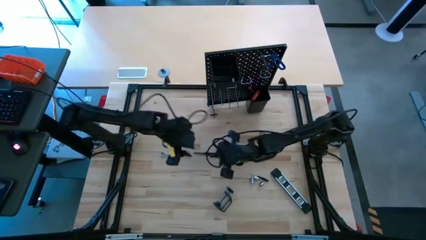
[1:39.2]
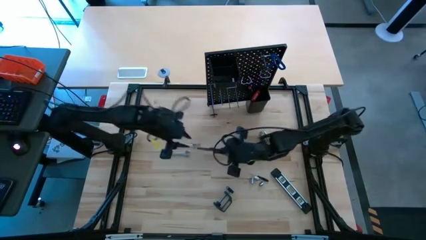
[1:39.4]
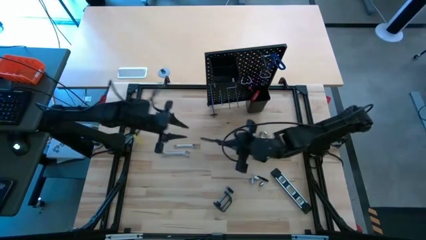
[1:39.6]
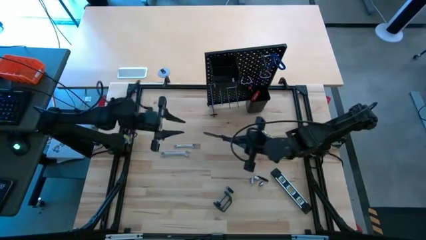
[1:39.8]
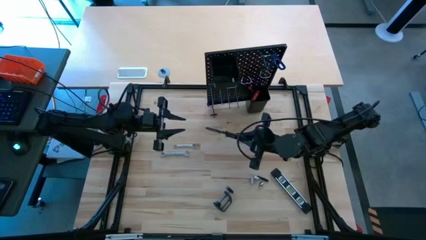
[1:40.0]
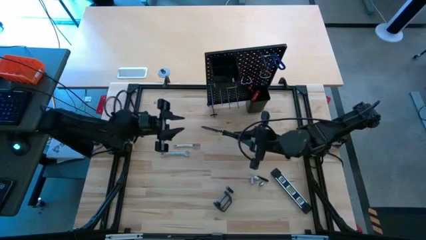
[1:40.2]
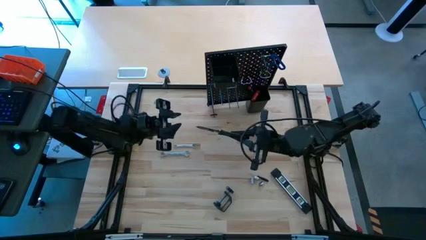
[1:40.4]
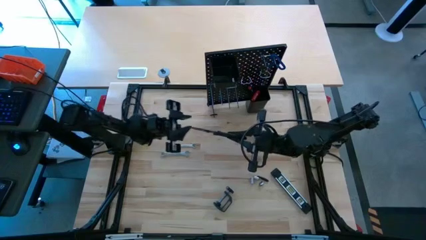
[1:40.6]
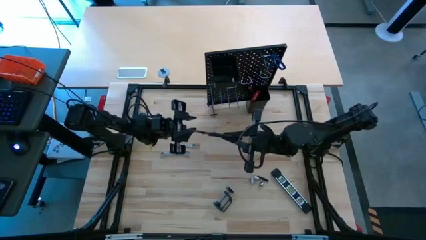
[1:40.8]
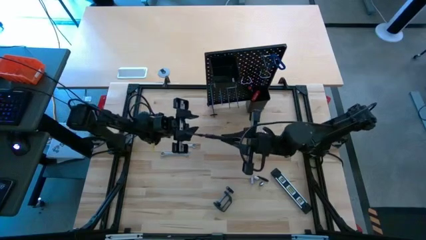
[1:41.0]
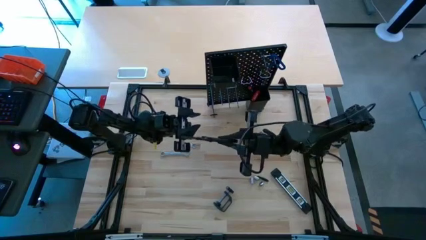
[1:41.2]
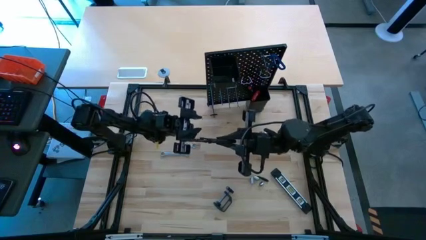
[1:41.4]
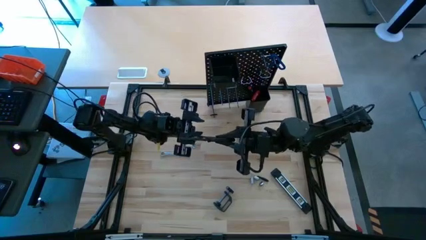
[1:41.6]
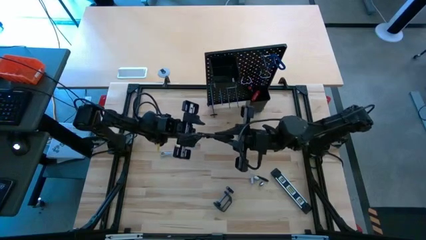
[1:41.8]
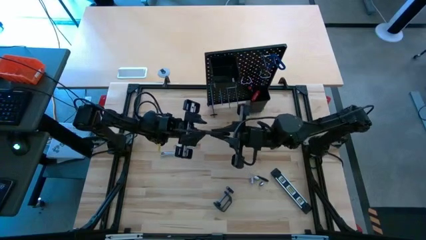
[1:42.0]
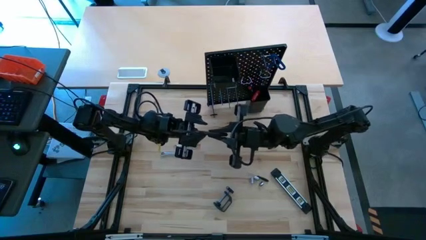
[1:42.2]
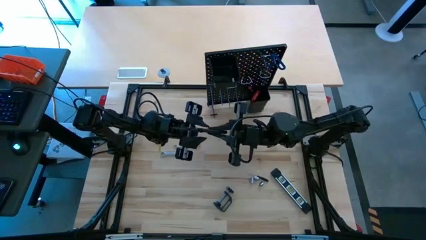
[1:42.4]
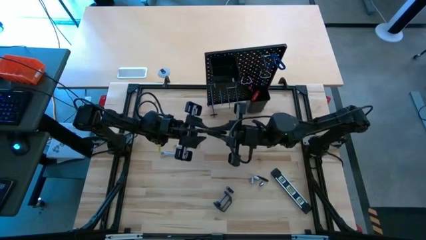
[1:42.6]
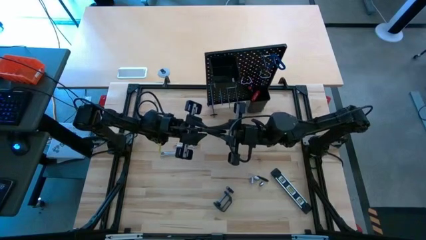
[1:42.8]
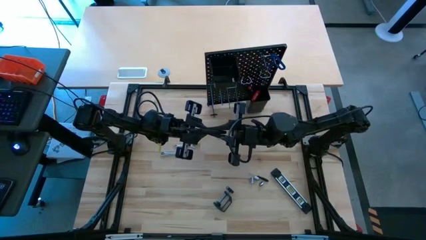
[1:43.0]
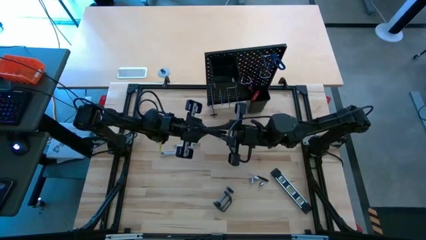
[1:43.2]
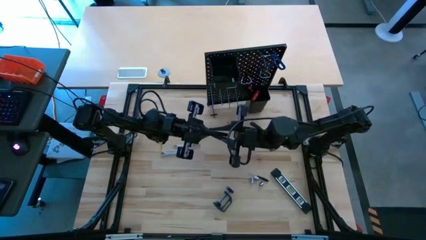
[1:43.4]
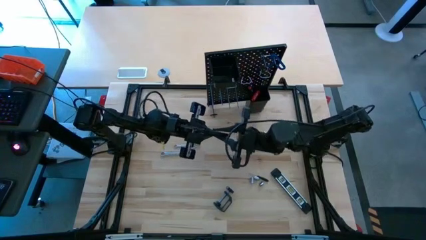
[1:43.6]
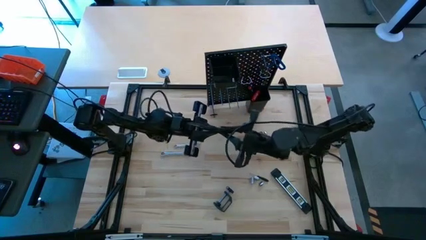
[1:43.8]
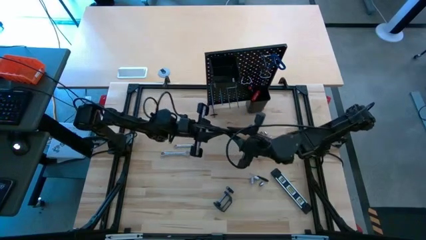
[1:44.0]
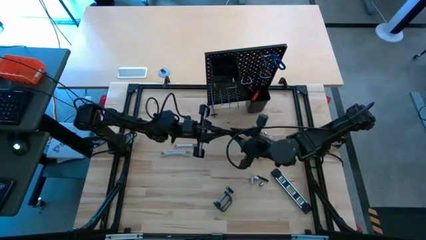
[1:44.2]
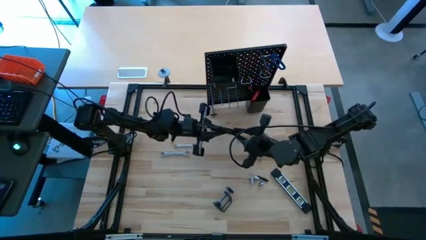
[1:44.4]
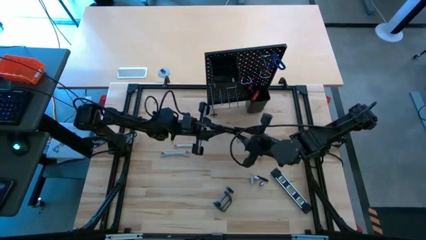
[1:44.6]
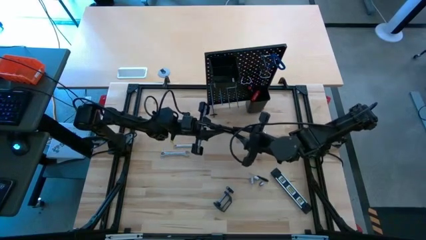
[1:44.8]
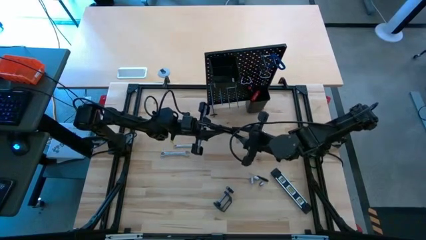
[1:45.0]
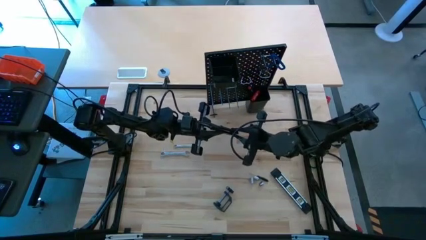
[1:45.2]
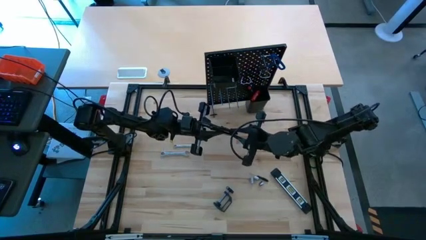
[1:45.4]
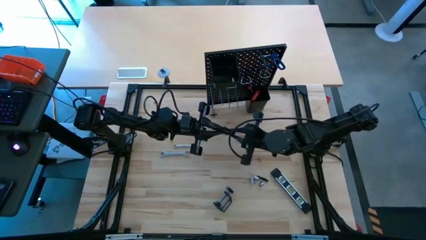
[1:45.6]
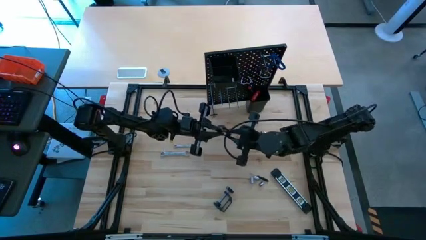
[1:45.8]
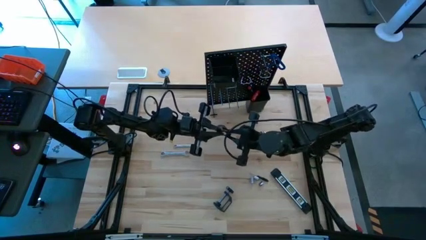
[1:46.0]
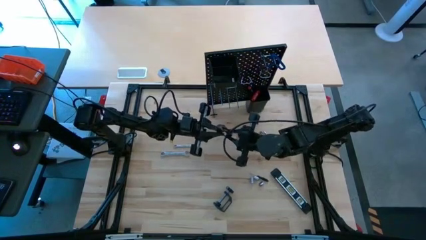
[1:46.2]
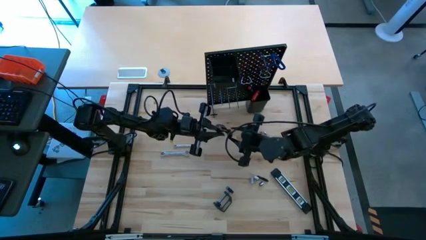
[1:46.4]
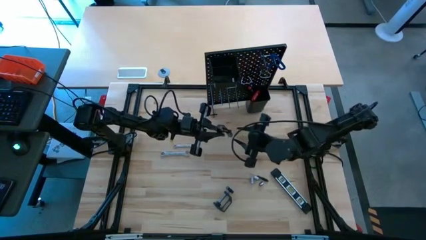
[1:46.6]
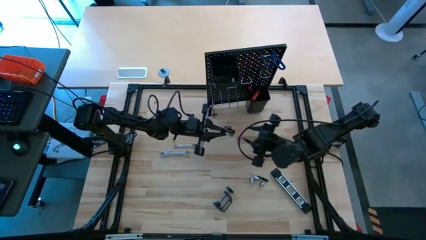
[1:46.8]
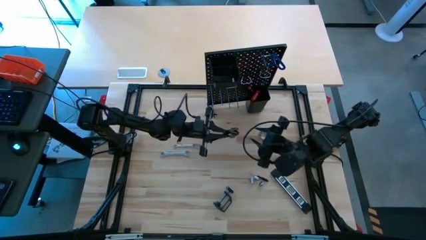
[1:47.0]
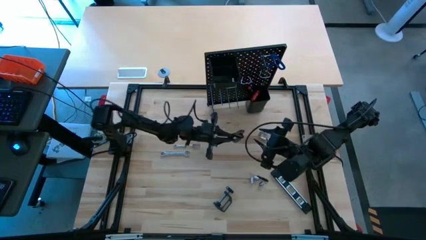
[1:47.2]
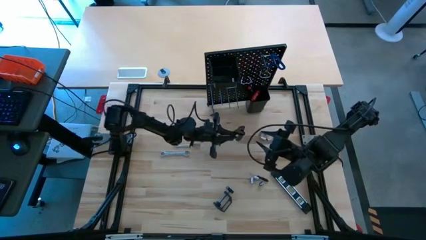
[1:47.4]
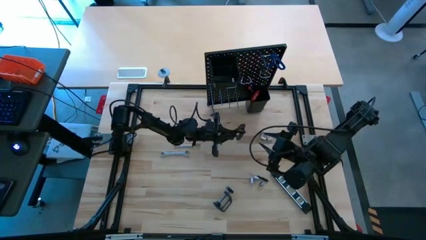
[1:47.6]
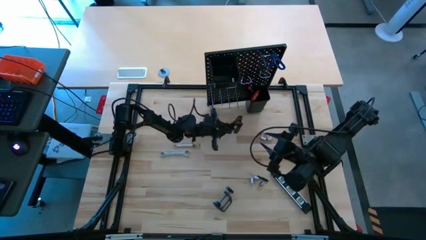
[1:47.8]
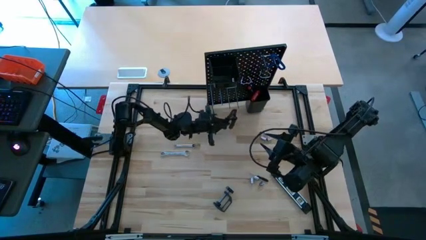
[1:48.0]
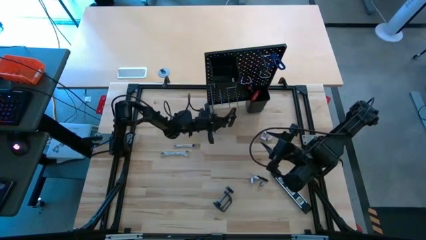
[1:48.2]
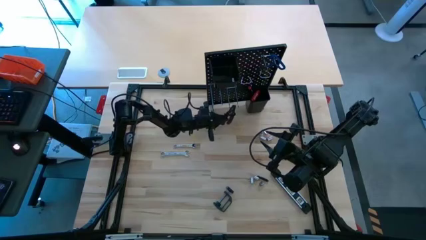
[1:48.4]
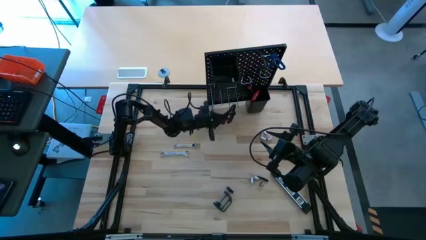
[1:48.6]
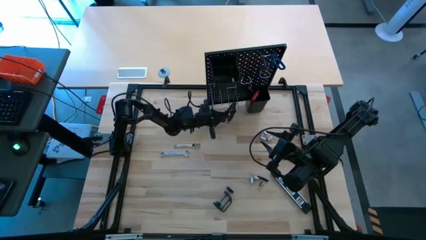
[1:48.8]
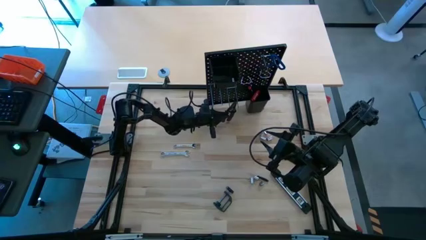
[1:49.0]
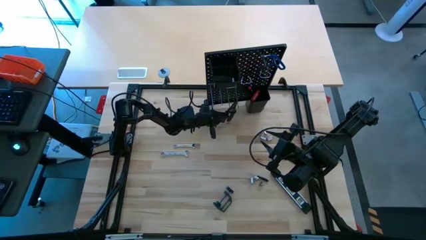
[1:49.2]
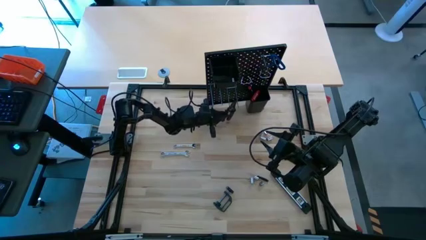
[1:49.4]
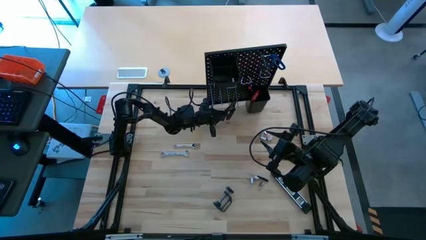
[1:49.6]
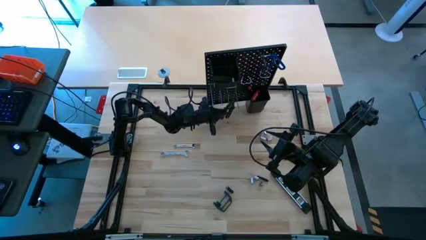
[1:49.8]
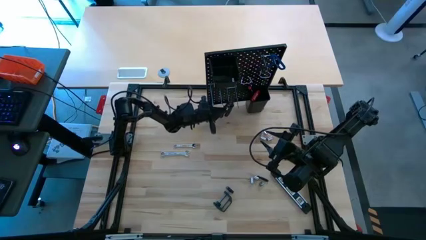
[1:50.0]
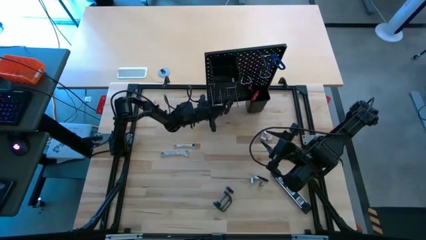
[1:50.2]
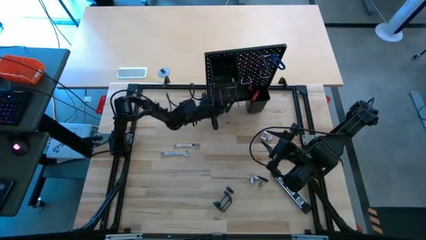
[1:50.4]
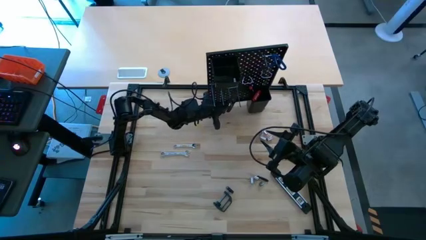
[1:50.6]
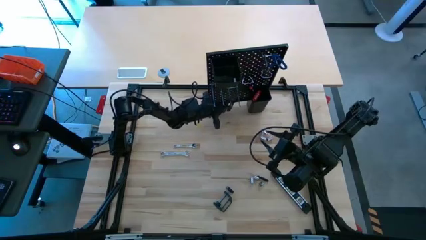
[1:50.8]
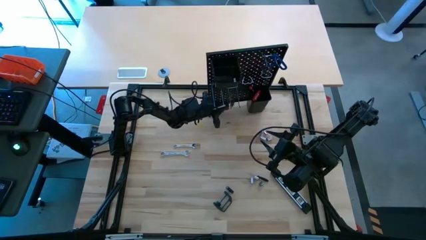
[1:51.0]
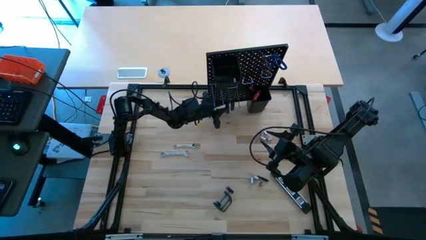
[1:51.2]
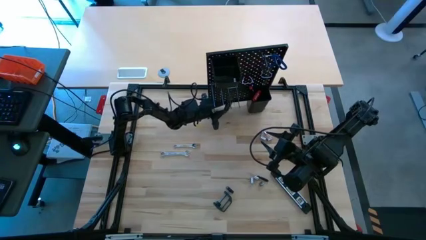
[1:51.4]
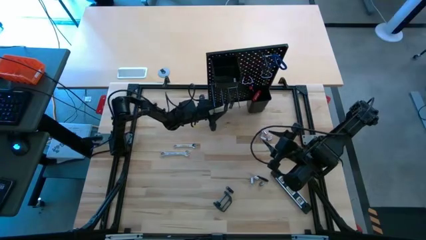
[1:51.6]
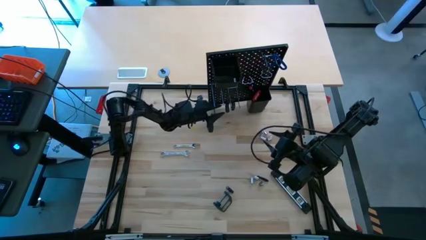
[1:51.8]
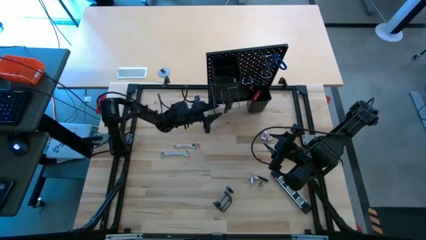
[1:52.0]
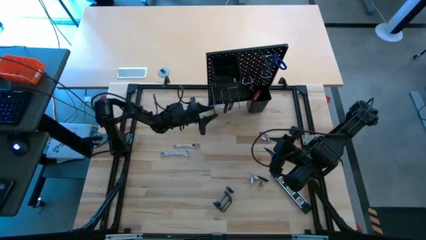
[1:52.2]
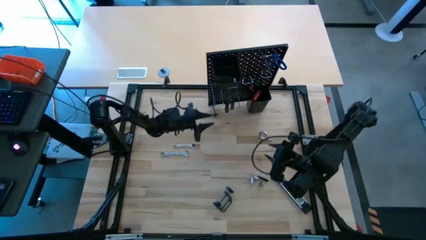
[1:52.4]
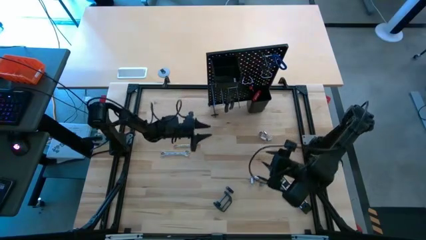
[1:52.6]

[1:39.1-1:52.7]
Task: Hang tools onto peg board
Hang the black crimping pliers on the peg board

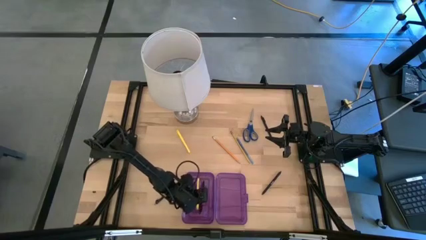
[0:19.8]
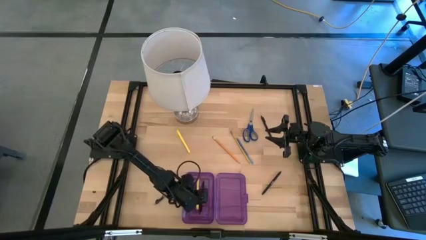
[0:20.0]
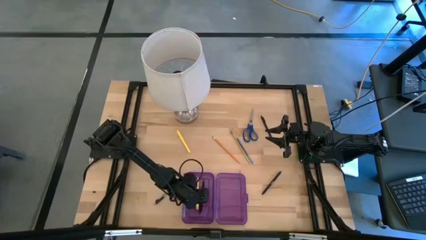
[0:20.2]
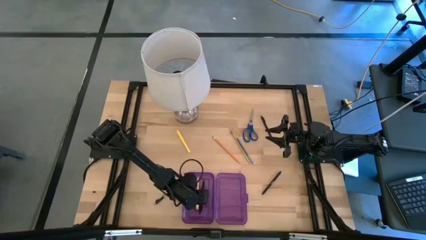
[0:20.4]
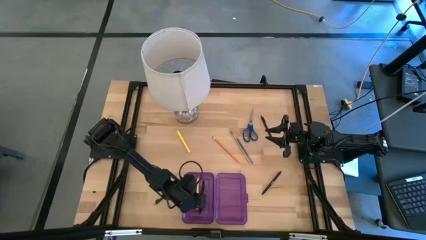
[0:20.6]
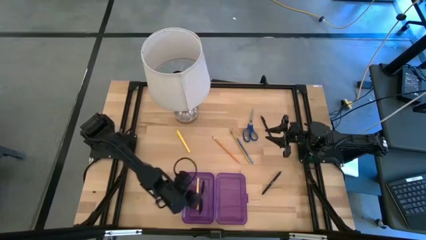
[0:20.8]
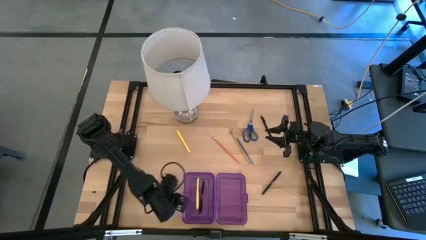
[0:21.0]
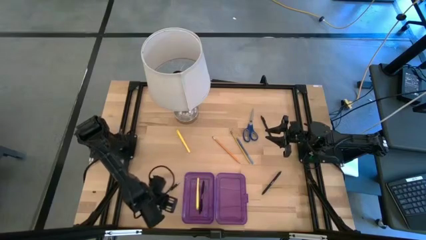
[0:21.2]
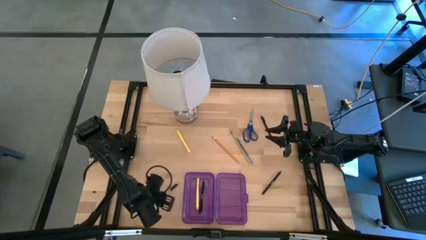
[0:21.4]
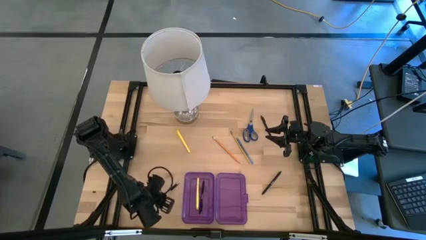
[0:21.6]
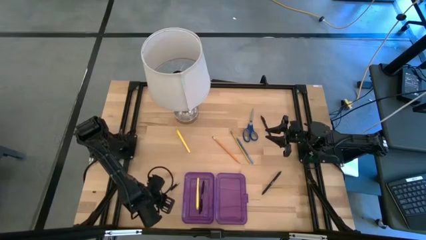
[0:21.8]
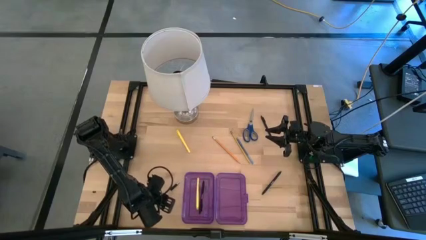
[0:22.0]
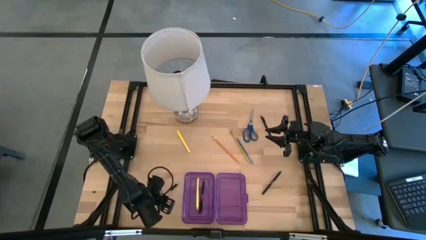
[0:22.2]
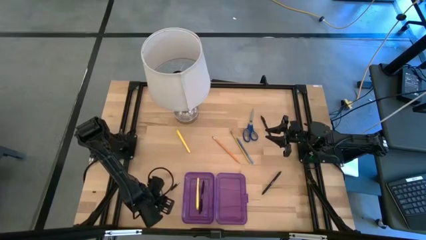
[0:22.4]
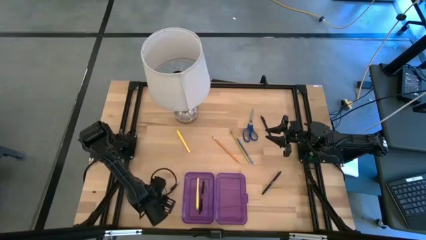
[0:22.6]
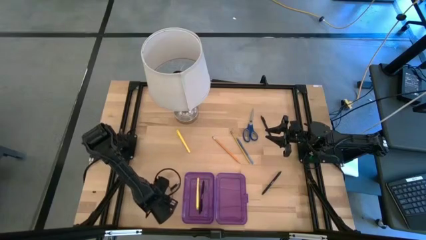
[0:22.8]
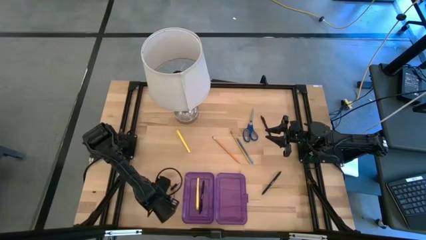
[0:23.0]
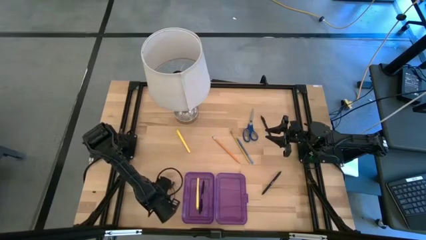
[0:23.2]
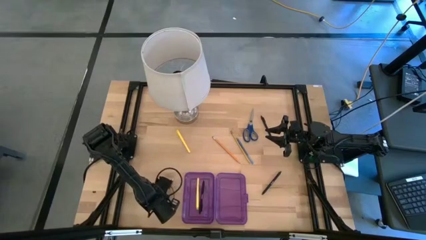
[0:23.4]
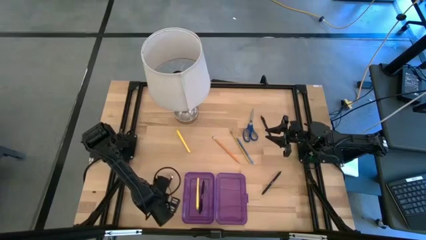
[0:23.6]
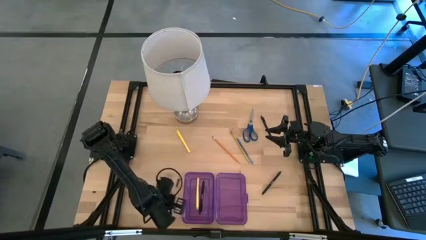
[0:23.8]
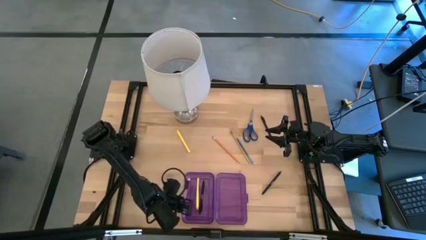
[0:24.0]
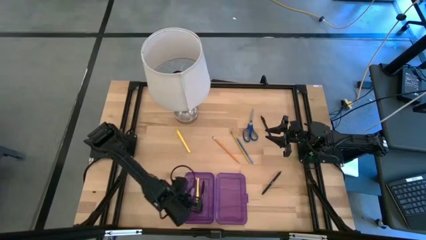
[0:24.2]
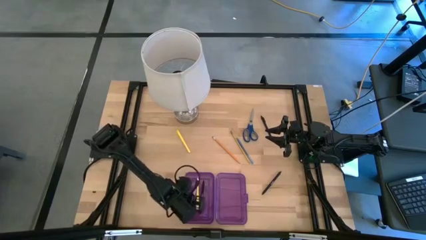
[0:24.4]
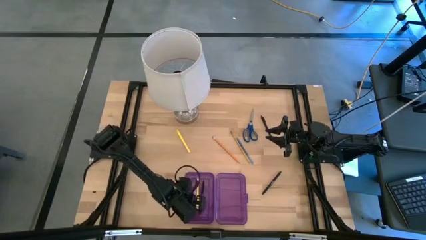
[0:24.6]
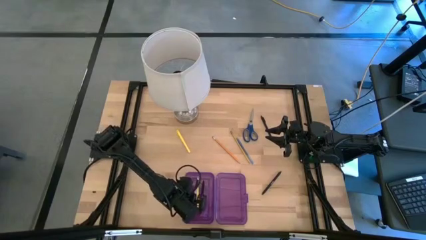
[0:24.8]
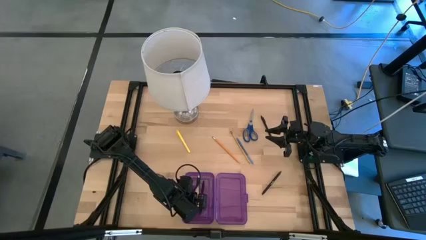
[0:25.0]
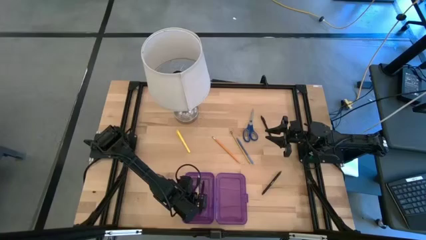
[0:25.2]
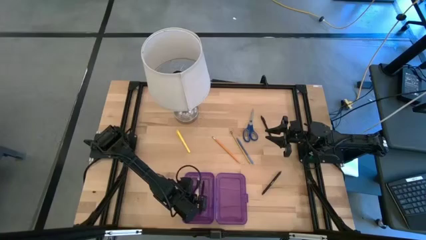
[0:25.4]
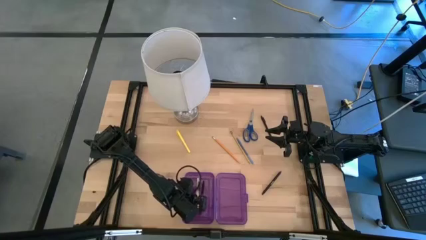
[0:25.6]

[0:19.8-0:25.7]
Task: Pick & place school supplies into a supply box
Put the bottom left black pen into the violet supply box
